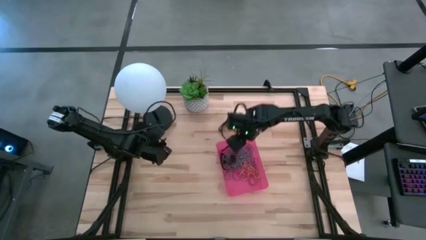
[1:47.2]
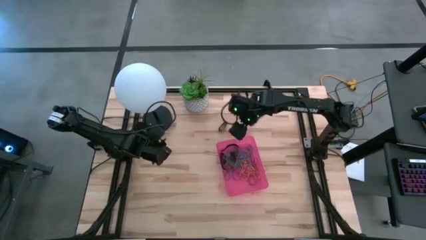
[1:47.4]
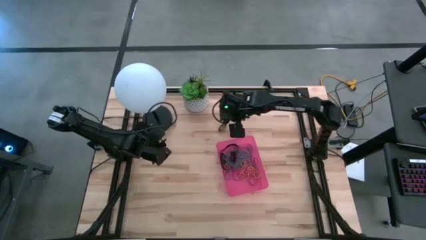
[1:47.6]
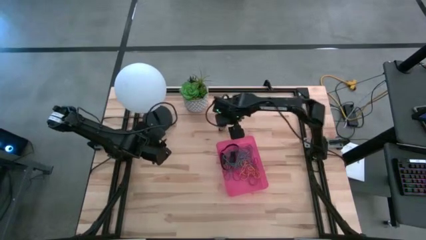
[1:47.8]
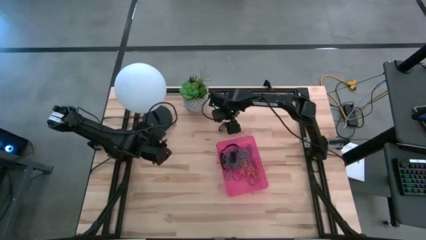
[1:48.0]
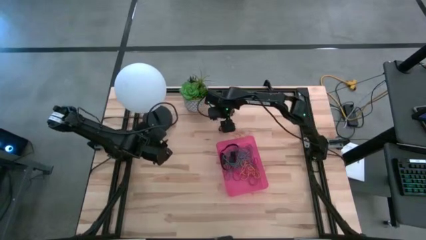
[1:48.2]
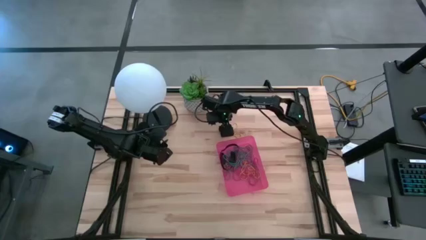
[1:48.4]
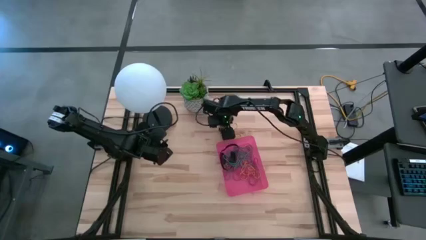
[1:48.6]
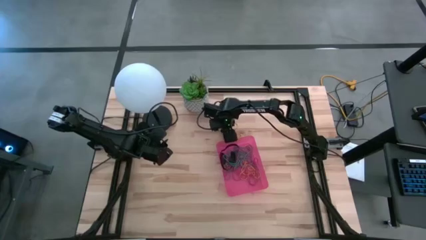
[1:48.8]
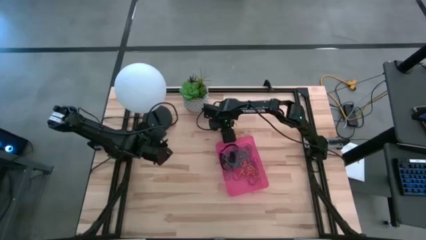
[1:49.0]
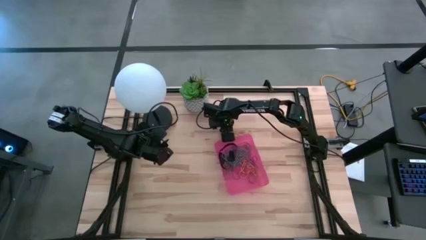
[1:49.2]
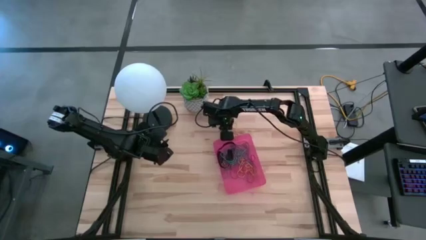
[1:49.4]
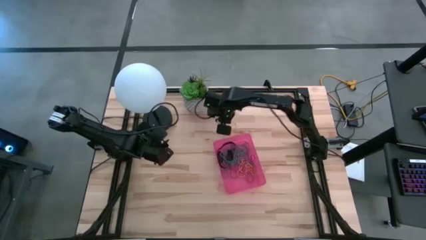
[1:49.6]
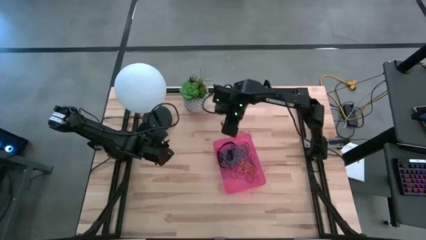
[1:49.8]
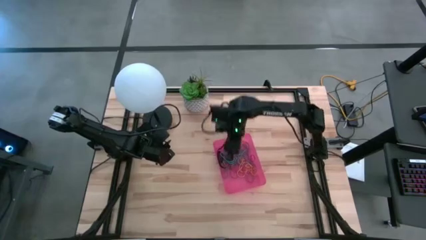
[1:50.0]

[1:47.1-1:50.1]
Task: Pick and place rubber bands into bin
Put the black rubber band into the red bin

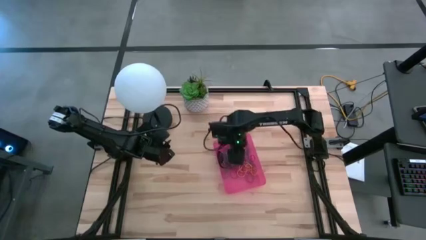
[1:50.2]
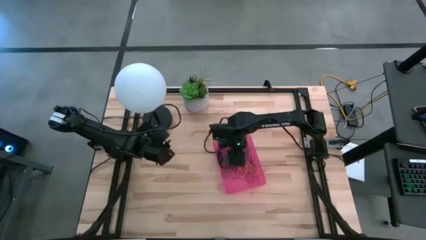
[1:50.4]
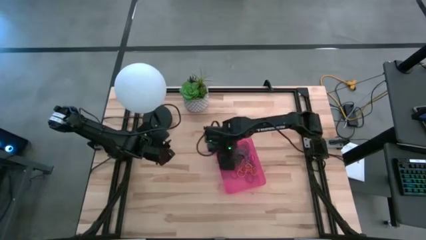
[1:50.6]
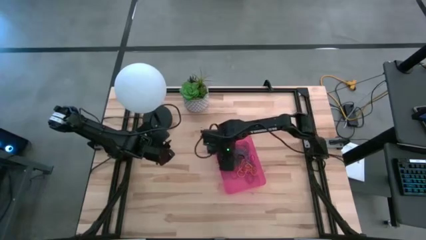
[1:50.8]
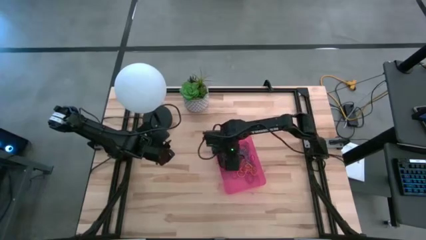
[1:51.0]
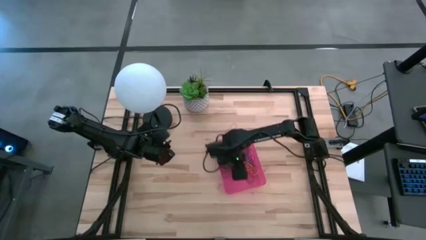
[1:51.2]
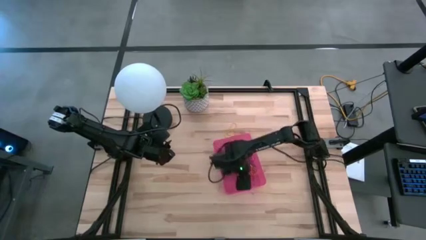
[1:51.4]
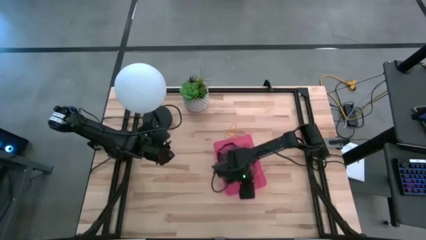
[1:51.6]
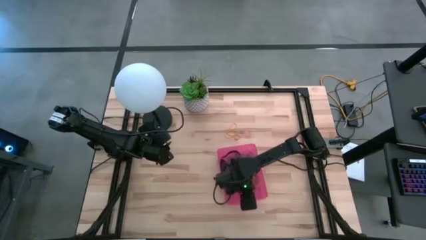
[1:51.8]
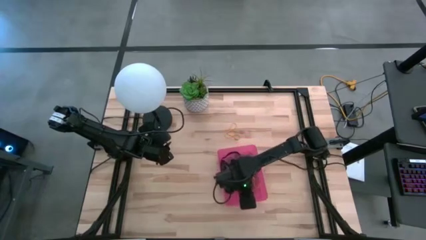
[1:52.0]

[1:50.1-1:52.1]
Adjust the red bin on the table

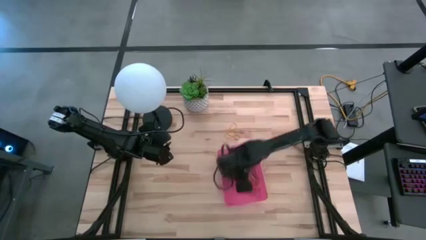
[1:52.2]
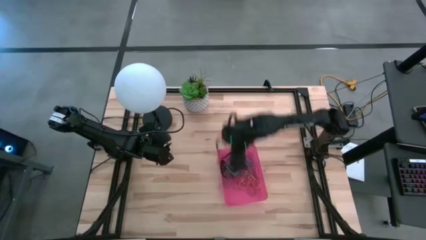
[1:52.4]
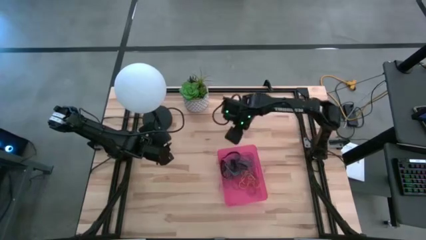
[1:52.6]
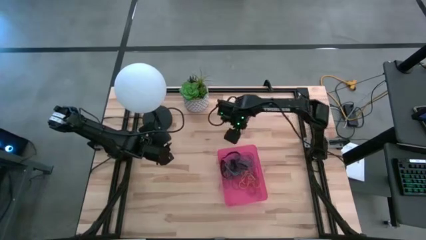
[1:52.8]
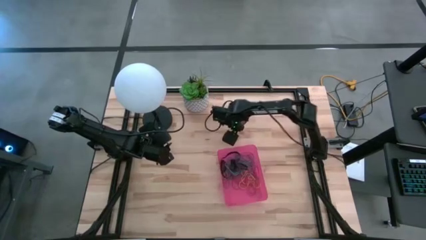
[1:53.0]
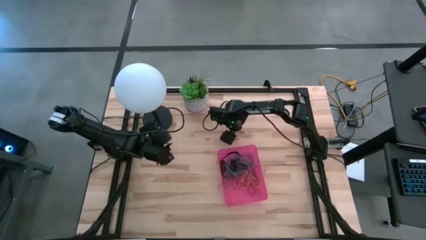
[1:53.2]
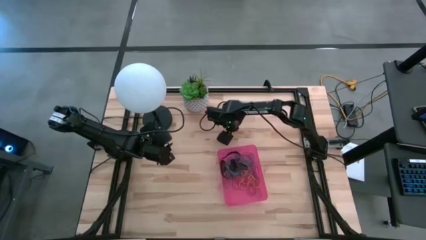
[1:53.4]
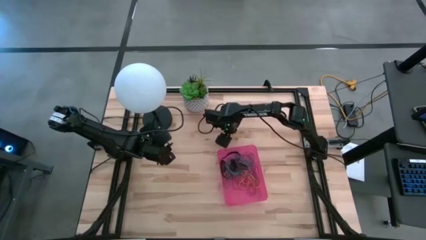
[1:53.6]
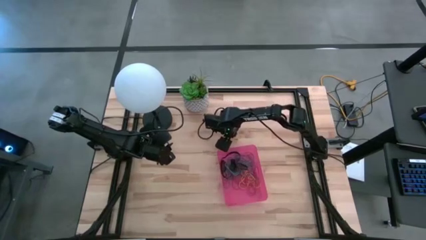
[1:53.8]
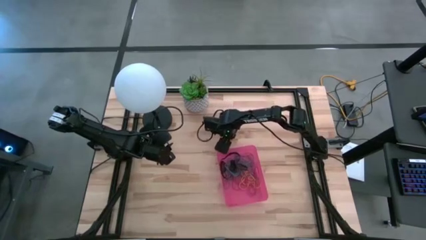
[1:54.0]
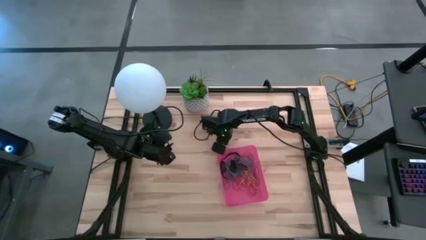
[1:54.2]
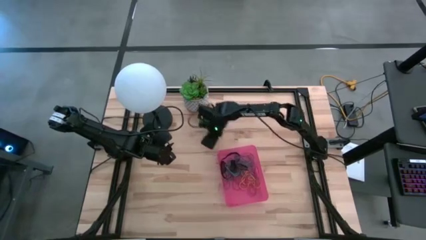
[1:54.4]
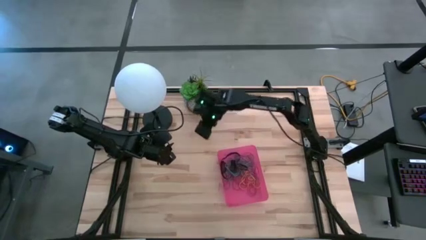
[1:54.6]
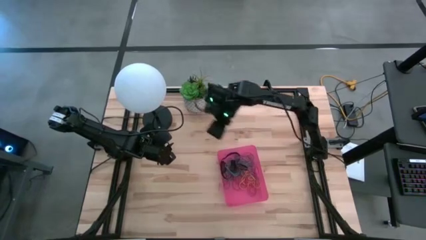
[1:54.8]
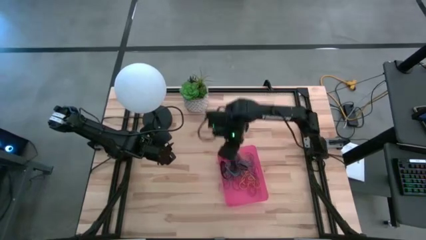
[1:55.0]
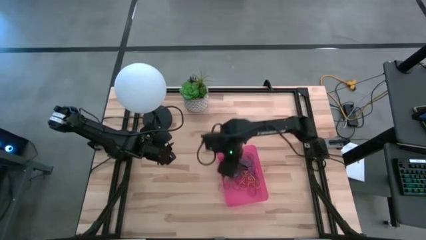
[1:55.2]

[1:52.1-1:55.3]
Put the yellow rubber band into the red bin

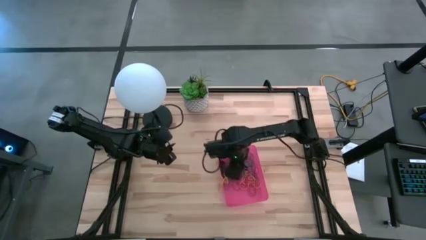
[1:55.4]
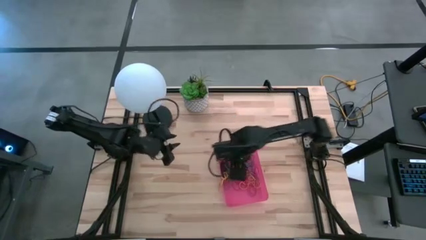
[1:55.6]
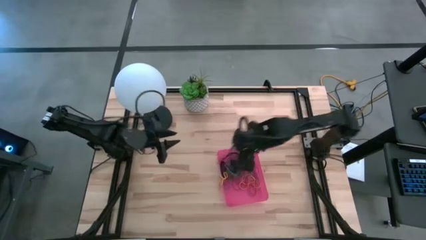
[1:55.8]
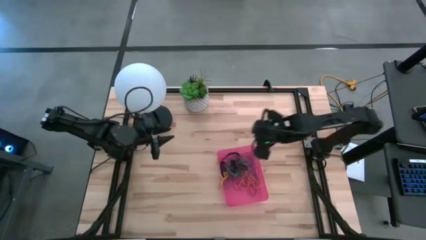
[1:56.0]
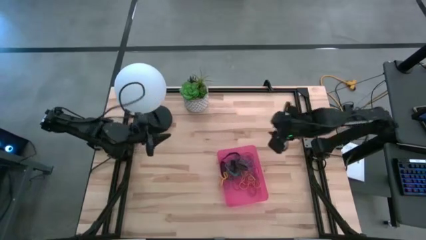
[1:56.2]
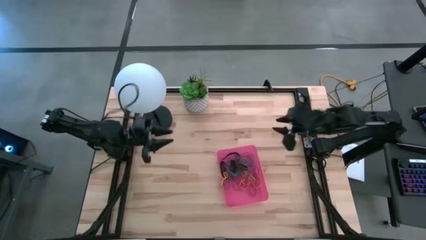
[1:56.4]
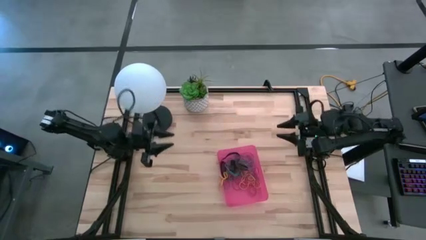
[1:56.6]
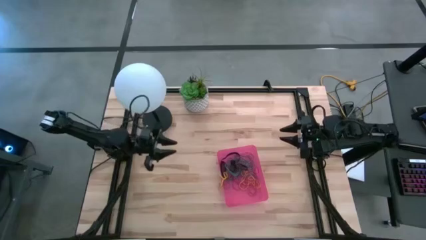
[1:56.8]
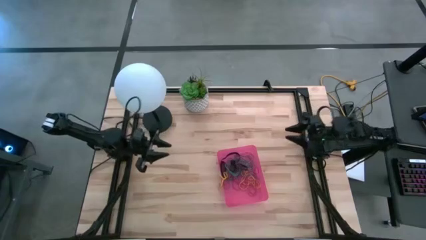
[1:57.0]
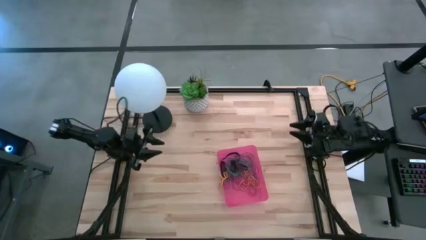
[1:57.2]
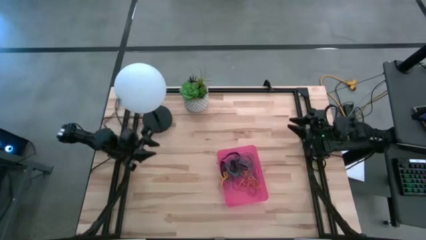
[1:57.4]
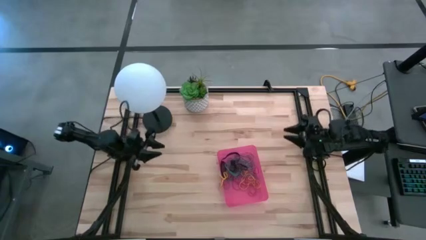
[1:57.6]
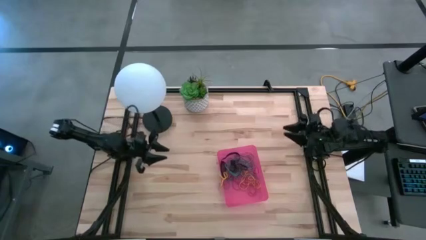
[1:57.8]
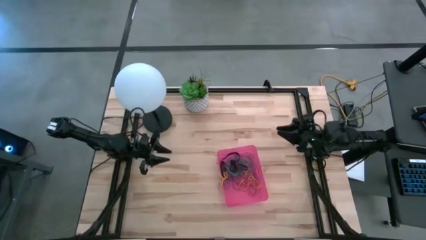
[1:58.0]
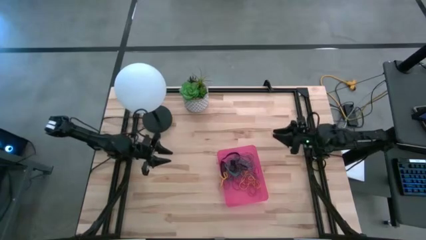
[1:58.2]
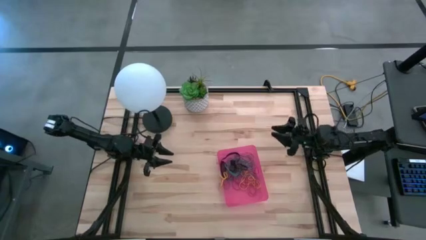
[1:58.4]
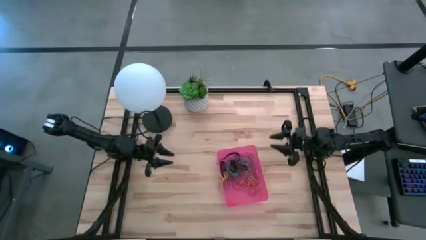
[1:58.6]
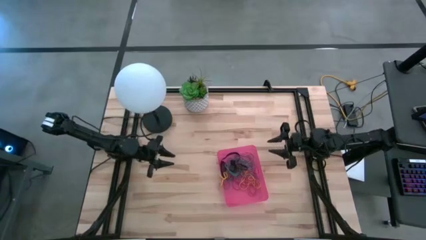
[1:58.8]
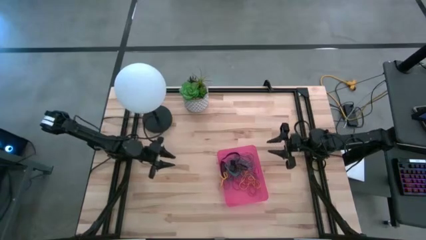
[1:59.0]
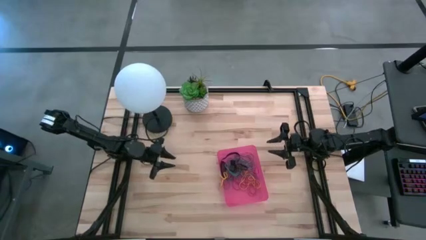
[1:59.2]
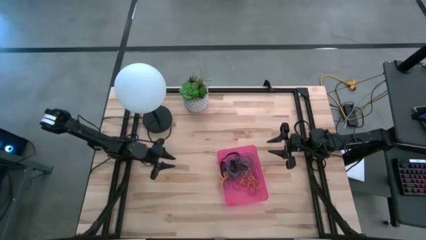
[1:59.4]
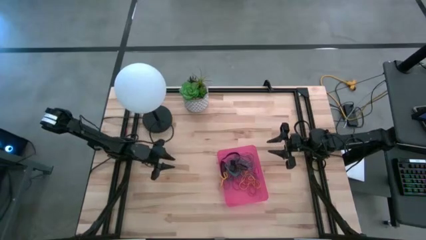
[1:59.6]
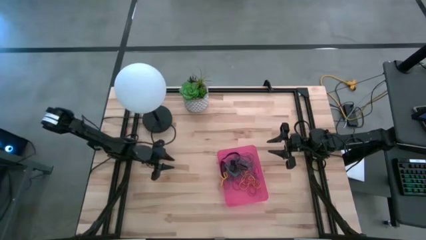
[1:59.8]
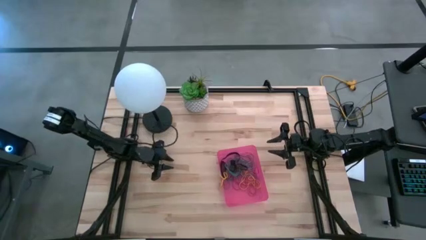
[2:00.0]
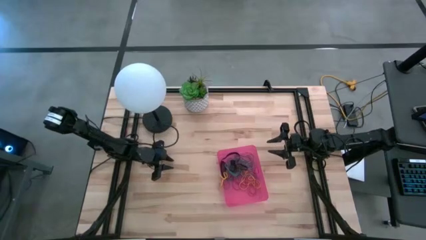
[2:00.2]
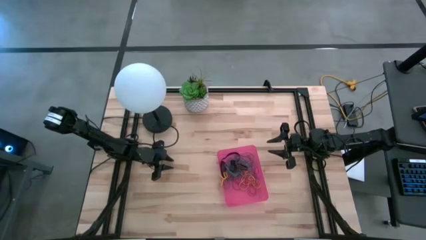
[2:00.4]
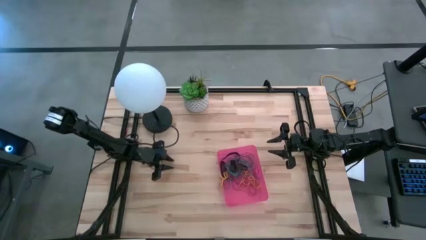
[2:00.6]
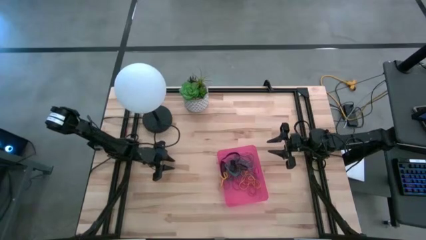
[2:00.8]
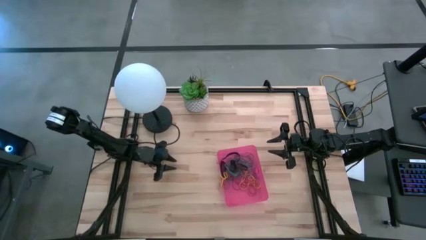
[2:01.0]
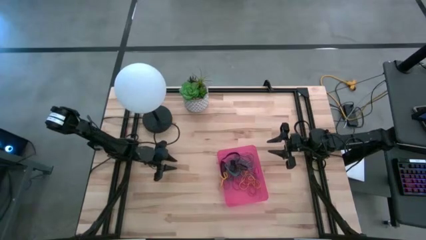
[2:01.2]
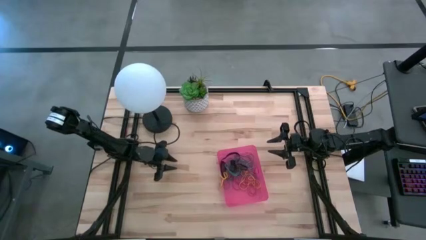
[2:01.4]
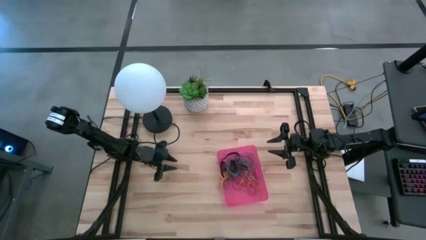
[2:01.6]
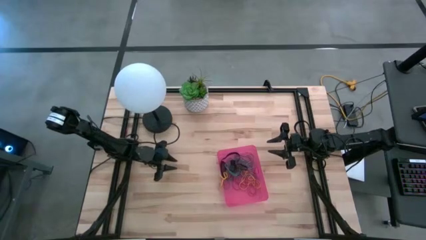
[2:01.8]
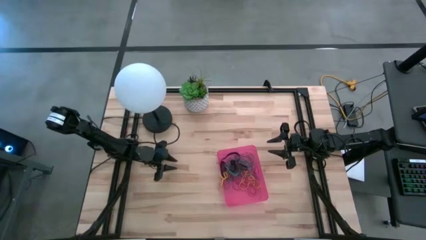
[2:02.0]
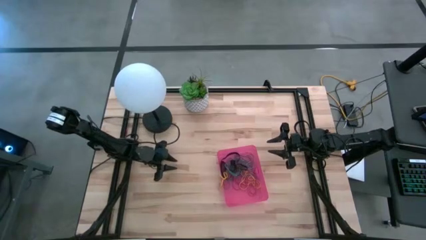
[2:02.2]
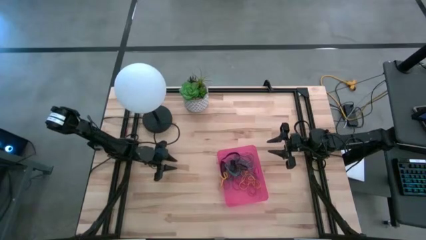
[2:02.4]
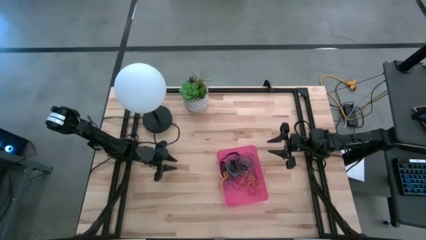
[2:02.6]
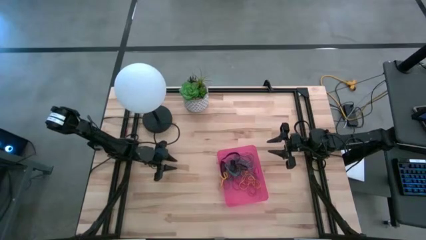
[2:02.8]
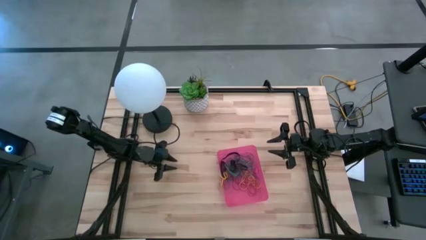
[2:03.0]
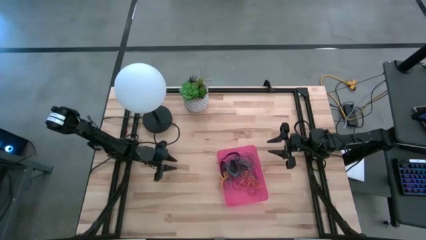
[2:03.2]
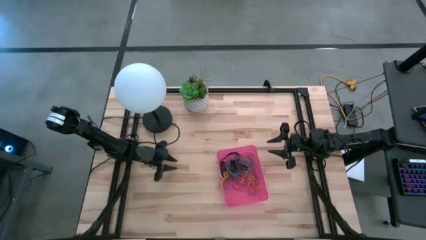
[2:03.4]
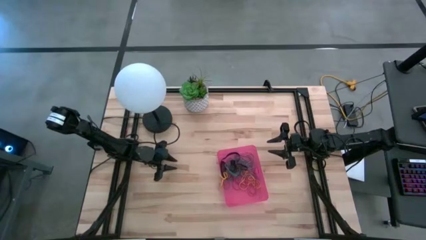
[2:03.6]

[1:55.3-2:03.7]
Return to Home Position

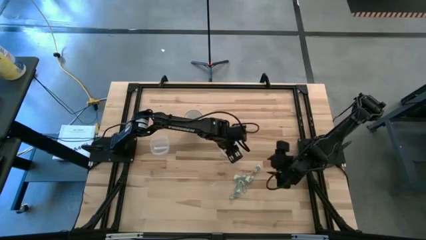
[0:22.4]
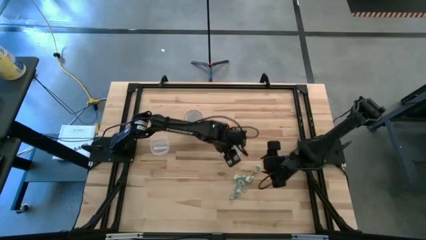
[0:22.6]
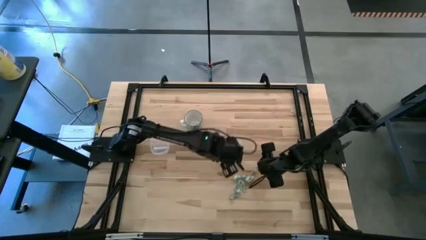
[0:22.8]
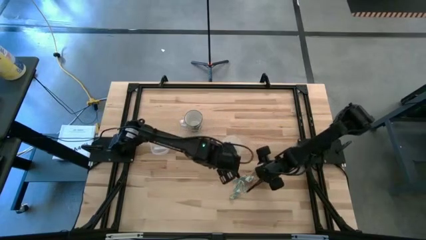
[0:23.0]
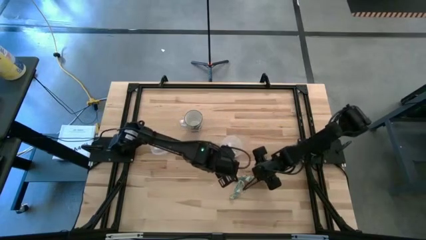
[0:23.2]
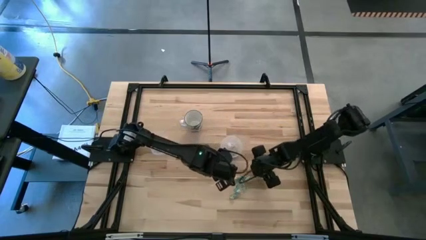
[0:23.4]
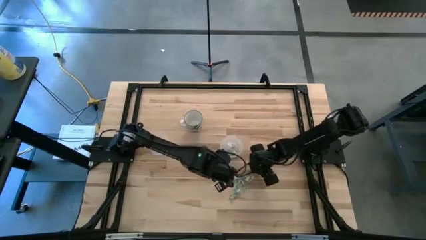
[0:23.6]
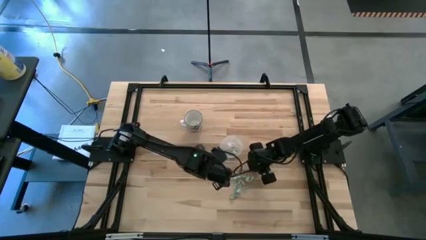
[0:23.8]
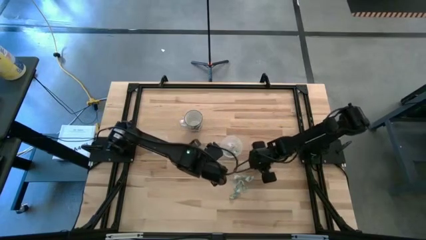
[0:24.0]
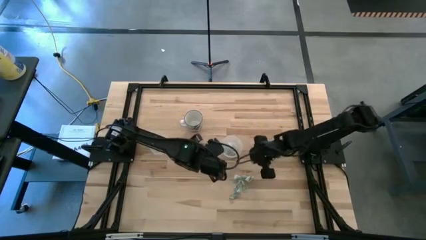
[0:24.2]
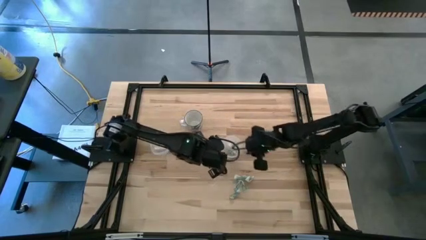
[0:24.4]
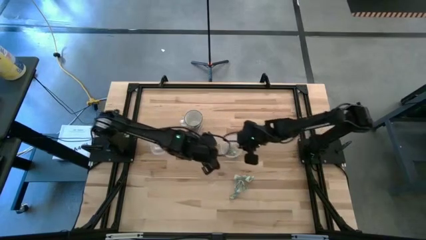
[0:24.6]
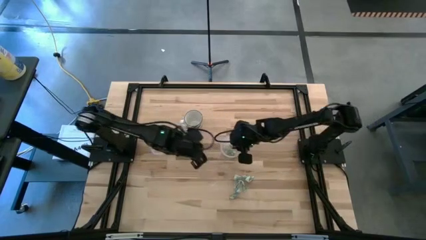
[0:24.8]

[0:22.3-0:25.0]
Task: Pick and place Stevia / Truvia into bins
Put the green stevia packet into the right transparent container
